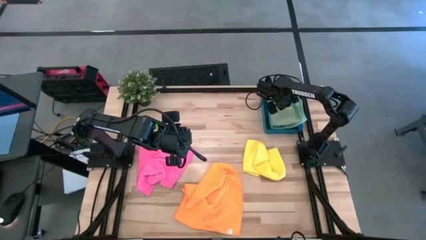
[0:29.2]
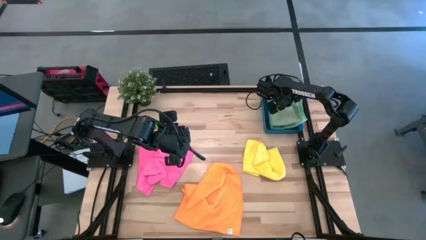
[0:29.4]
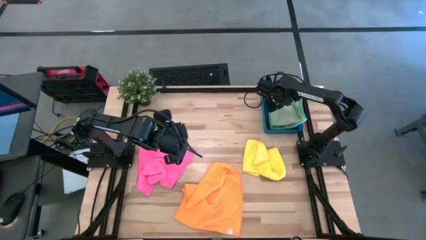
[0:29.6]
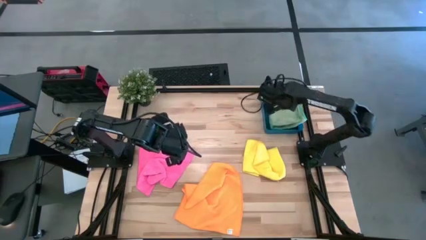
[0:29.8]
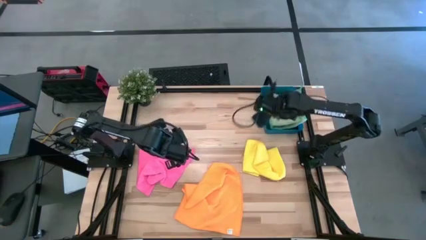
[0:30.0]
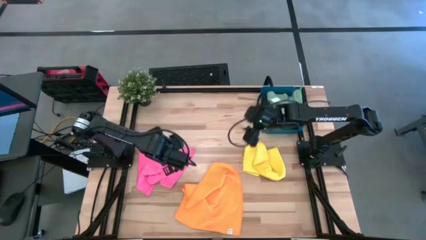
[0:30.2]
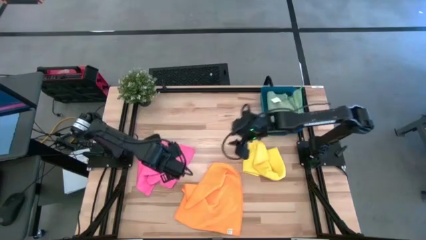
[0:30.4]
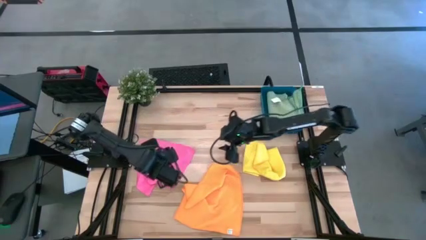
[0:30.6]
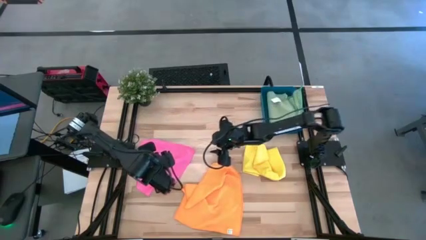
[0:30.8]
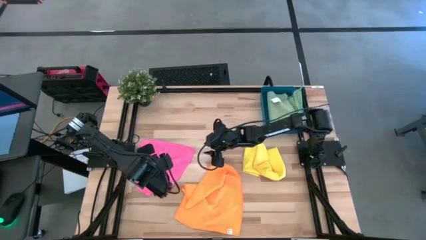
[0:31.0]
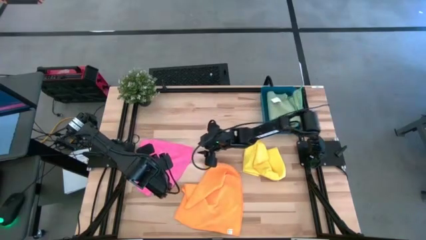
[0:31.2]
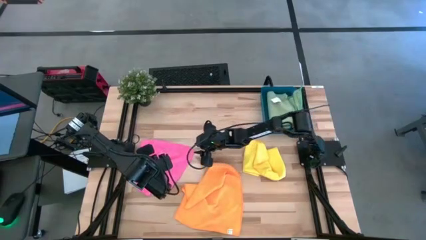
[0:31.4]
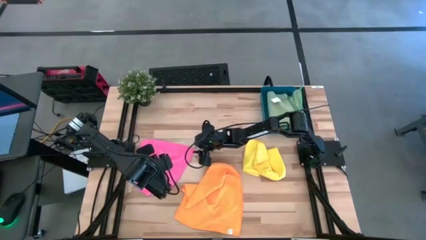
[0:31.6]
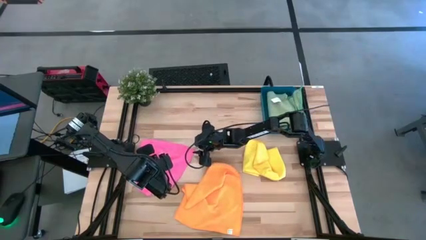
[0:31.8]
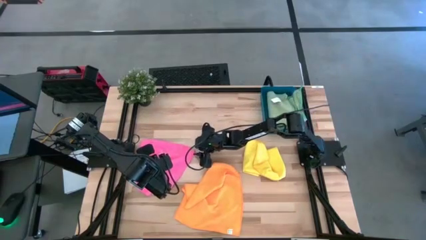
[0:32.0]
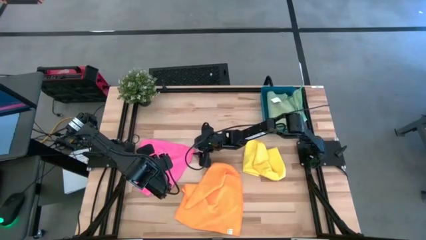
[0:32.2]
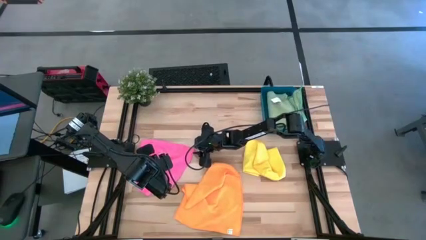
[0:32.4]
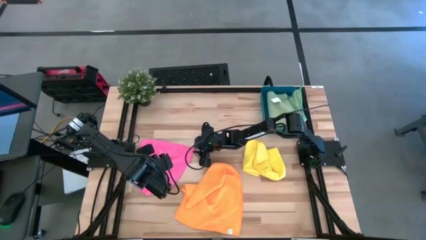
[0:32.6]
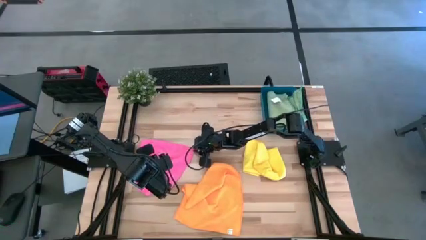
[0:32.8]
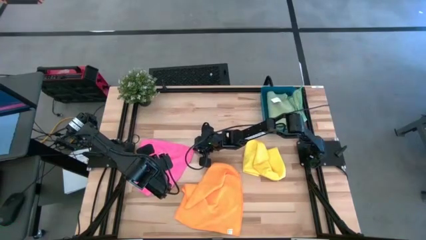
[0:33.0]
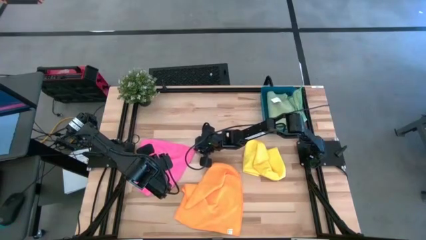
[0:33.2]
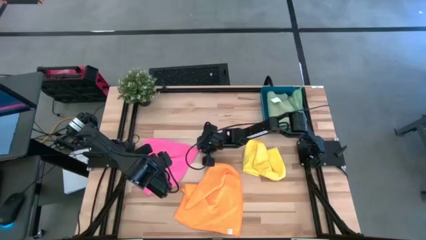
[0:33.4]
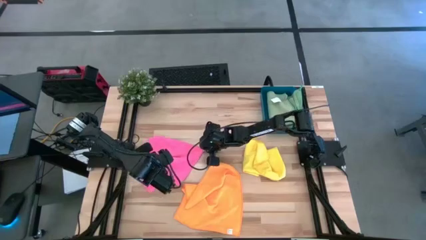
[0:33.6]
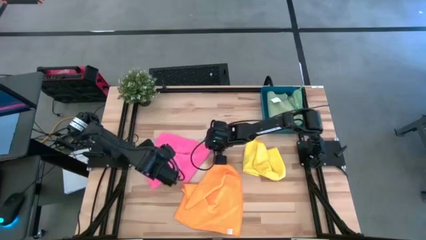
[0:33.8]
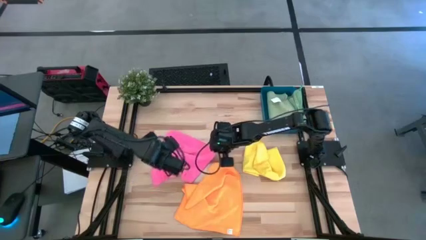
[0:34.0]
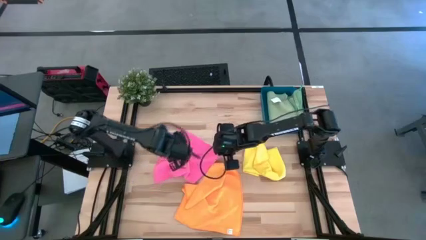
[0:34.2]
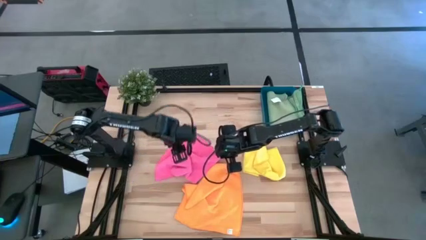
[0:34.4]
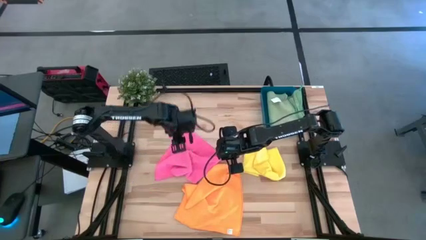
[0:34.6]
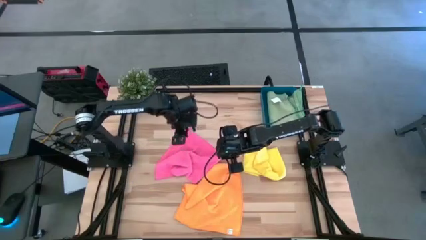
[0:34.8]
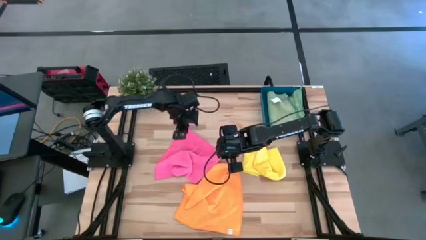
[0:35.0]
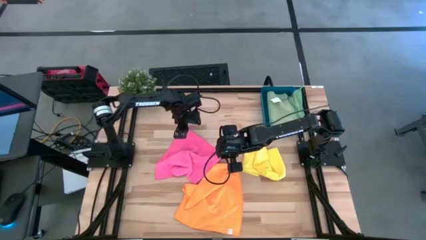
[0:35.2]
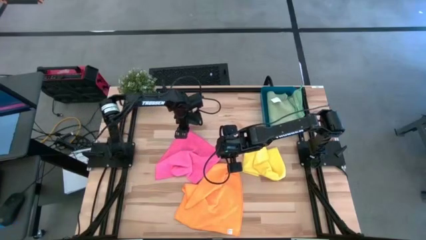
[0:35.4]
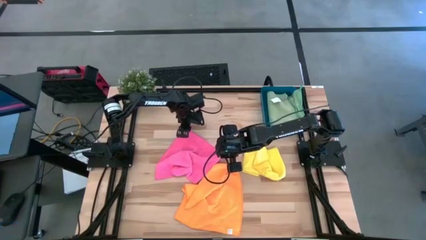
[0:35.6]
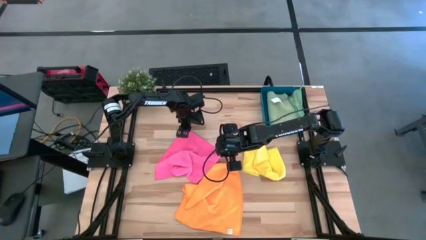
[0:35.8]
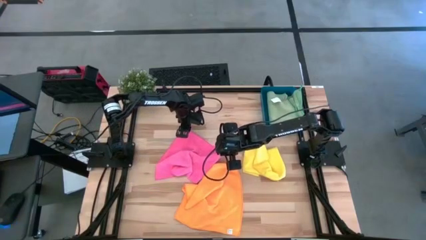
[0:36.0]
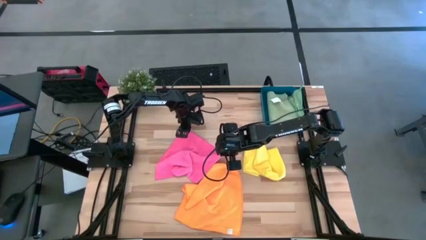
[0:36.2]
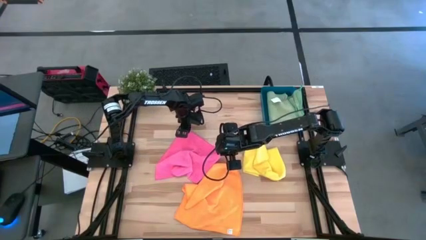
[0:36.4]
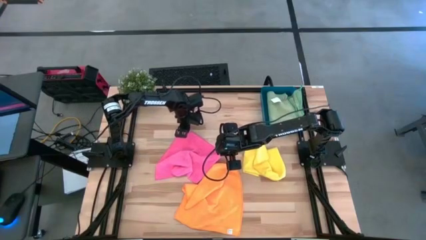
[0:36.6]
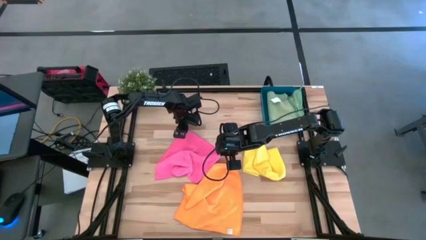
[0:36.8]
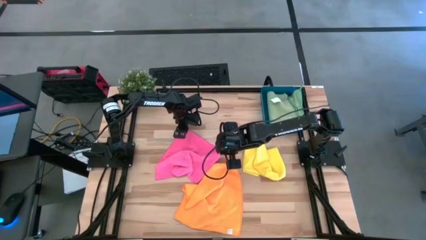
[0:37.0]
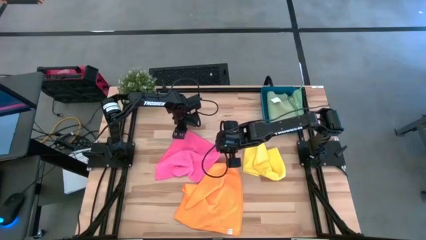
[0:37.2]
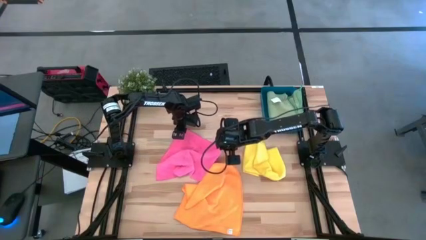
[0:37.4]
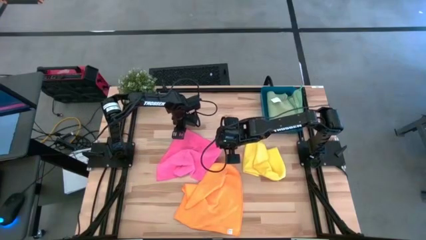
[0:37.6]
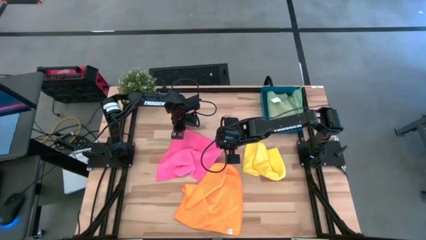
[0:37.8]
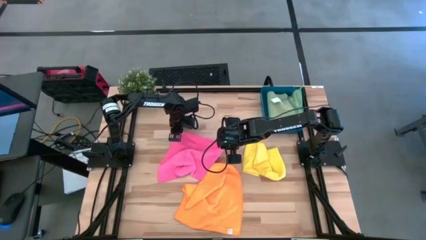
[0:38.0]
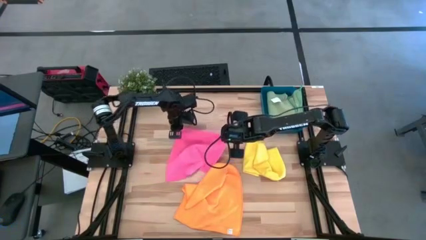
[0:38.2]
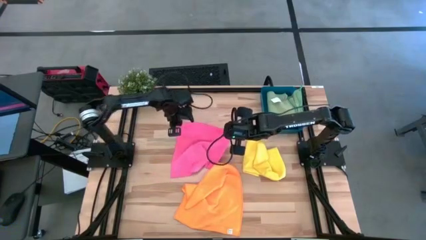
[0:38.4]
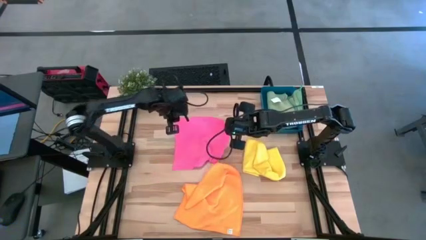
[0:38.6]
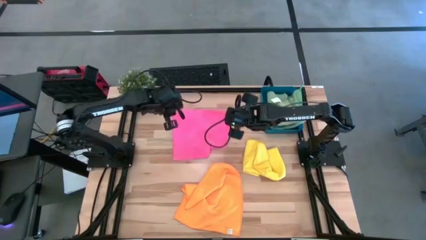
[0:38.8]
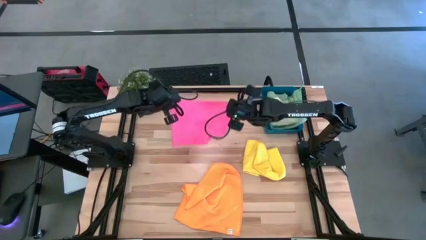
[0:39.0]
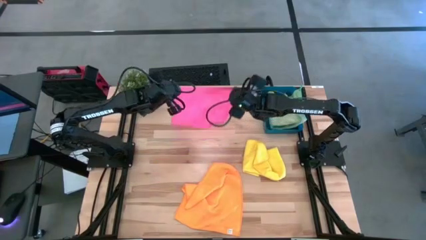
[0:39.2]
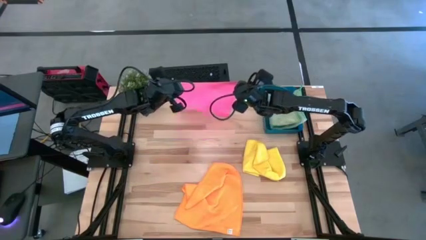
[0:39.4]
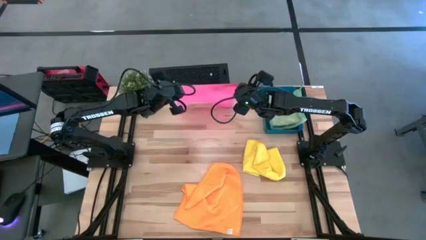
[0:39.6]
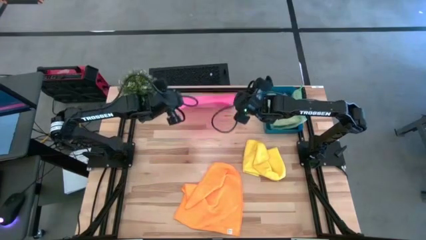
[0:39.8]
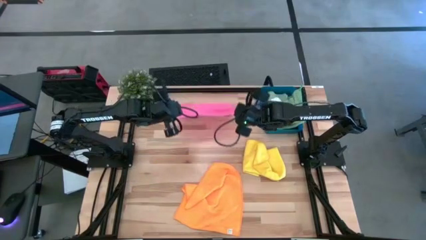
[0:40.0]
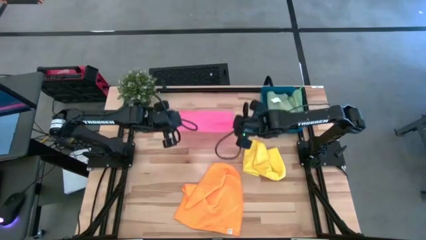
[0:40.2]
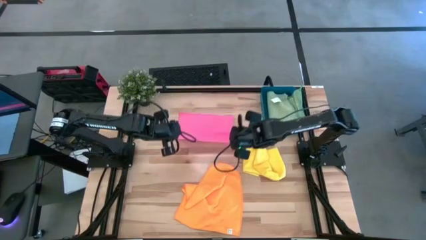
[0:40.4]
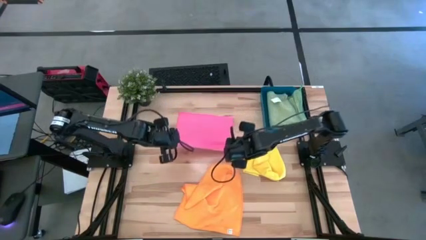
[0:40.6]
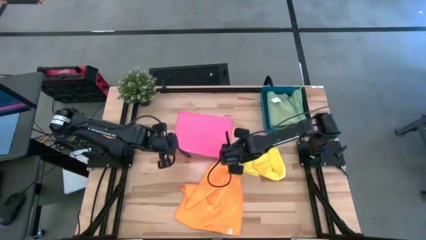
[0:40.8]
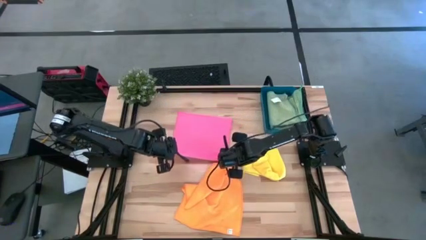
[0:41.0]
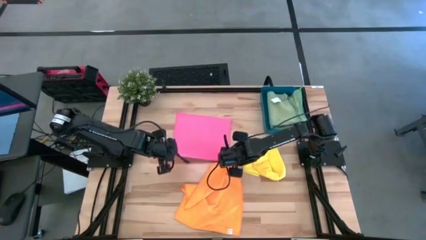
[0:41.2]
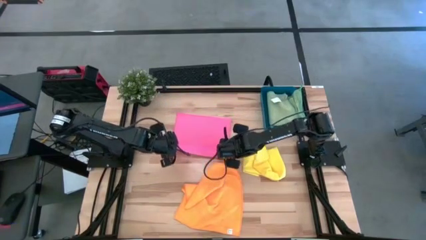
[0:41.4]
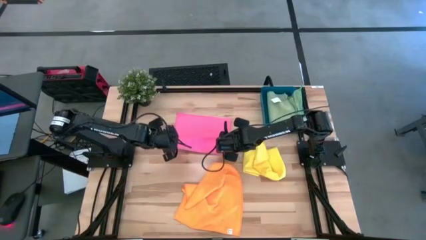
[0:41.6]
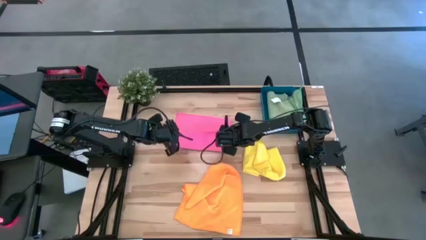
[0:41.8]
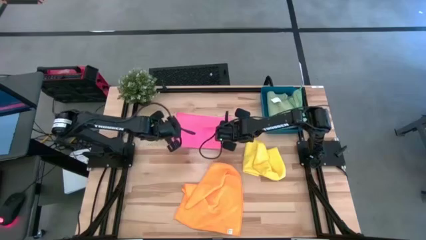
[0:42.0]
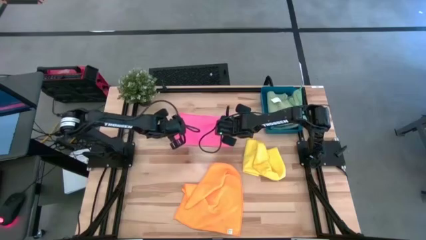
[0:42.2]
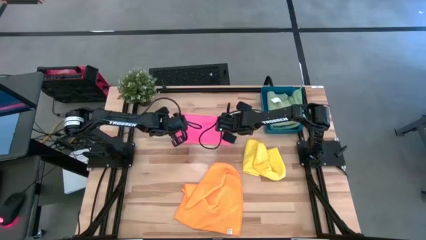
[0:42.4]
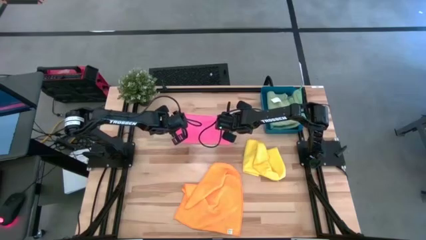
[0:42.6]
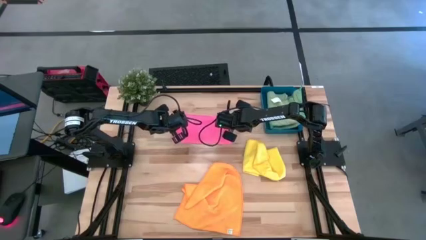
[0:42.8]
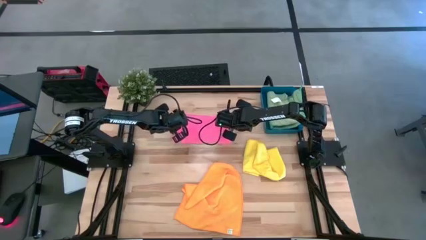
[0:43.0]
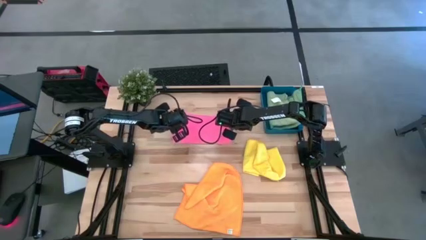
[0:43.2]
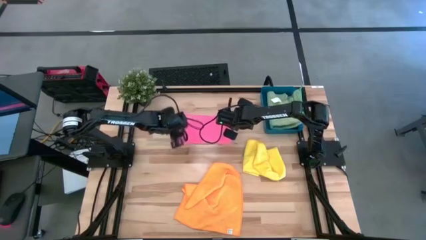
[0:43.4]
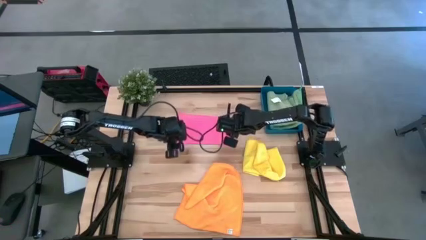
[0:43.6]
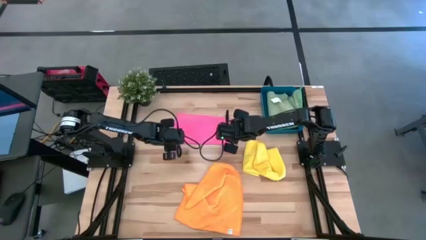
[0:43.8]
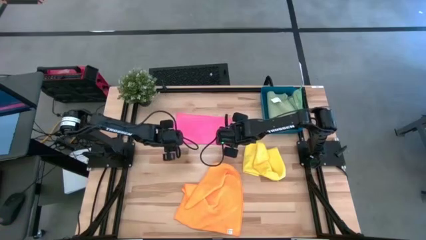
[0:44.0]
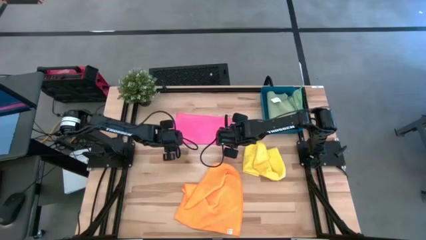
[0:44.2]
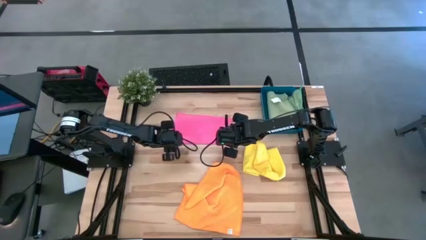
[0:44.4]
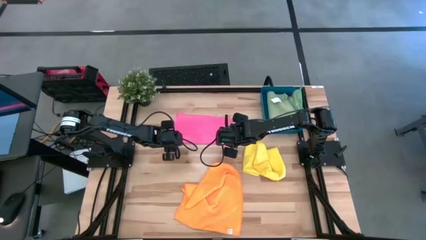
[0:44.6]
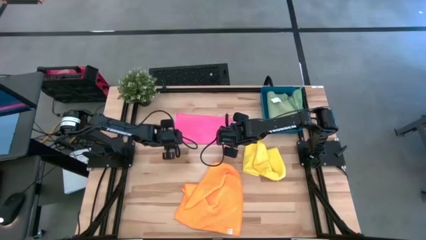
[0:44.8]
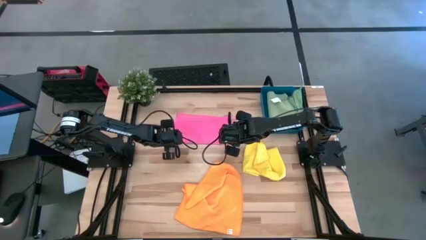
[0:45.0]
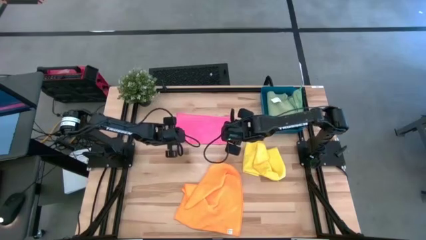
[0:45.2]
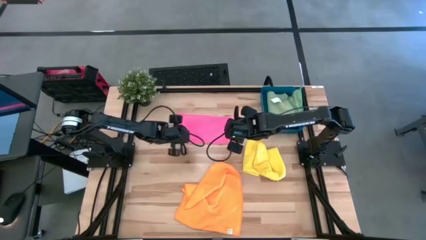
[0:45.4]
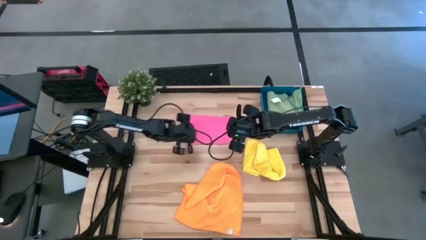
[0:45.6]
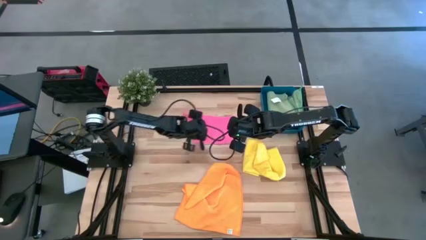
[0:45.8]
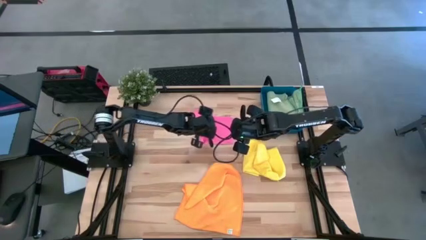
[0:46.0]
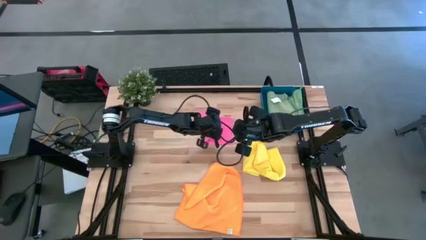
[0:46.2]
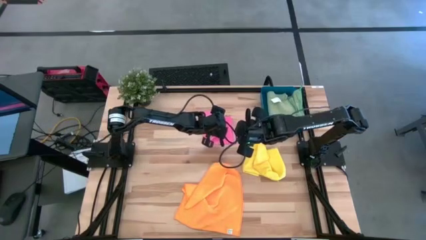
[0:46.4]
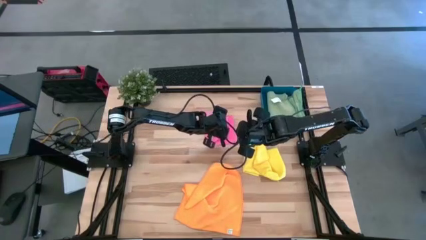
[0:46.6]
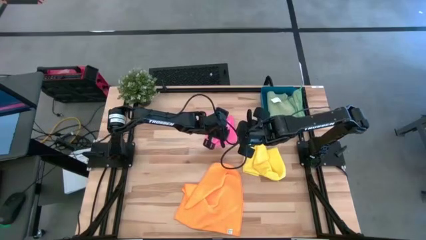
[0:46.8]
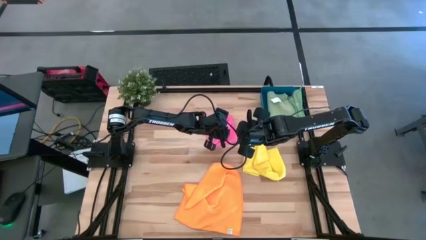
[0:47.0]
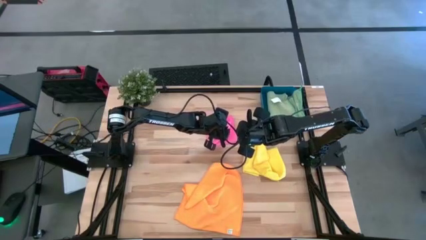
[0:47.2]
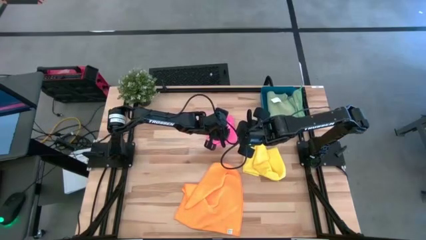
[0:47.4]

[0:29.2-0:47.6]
Task: Fold microfiber towels
Fold the pink microfiber towel
